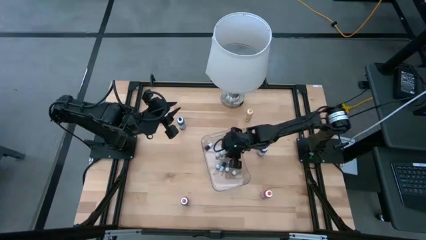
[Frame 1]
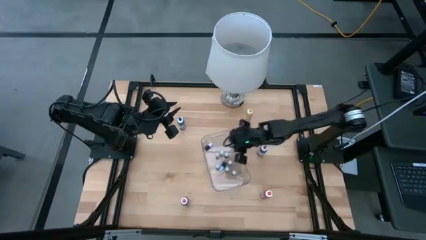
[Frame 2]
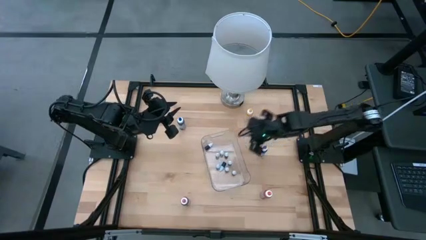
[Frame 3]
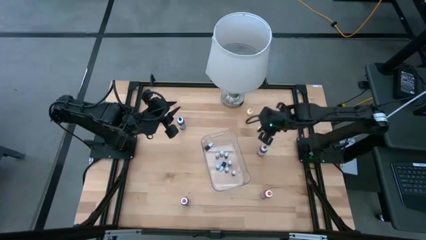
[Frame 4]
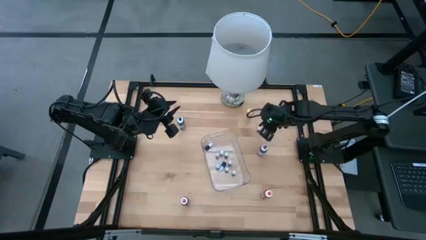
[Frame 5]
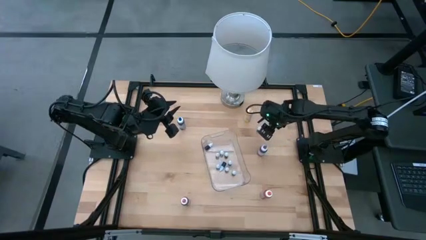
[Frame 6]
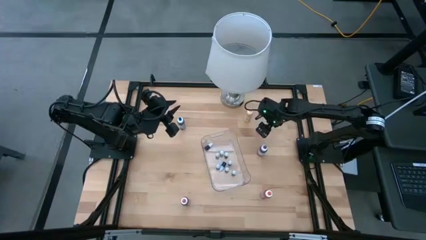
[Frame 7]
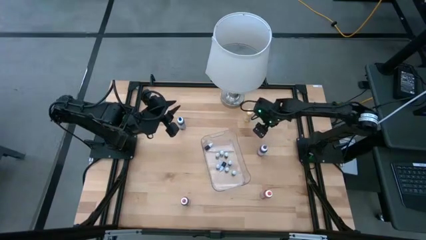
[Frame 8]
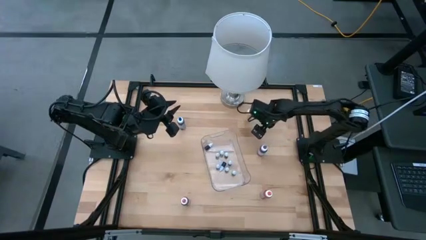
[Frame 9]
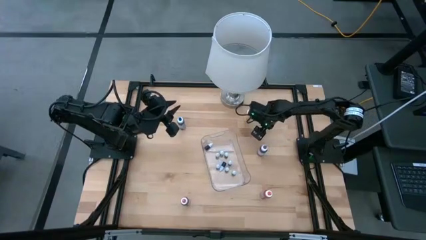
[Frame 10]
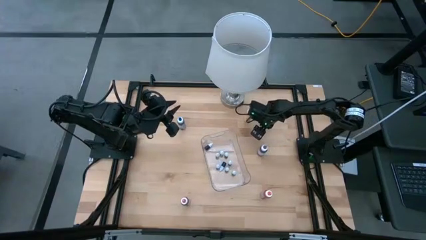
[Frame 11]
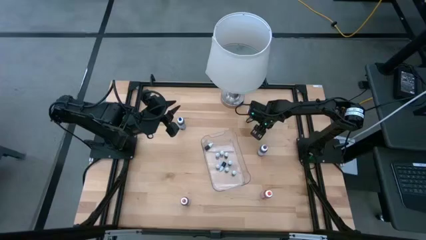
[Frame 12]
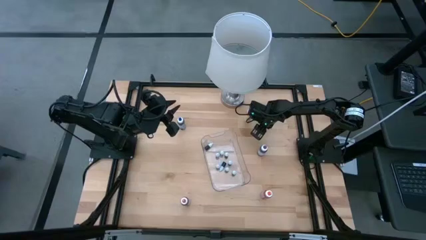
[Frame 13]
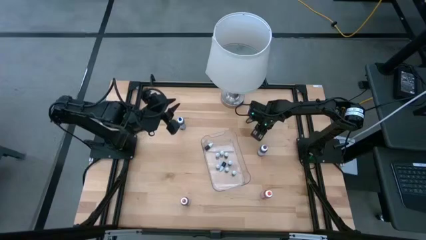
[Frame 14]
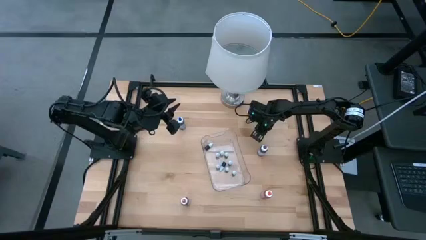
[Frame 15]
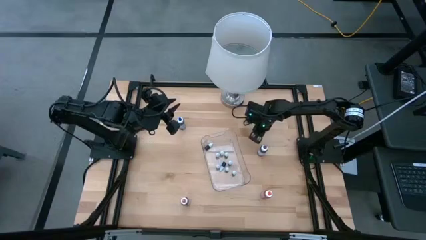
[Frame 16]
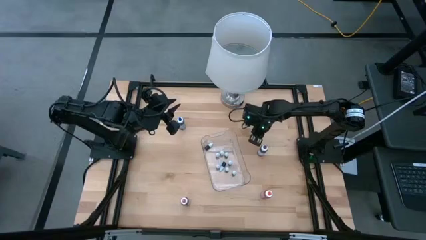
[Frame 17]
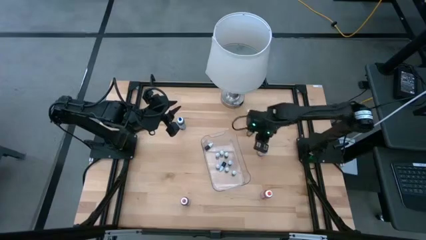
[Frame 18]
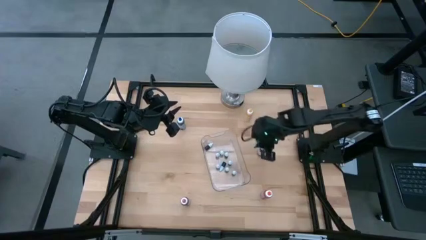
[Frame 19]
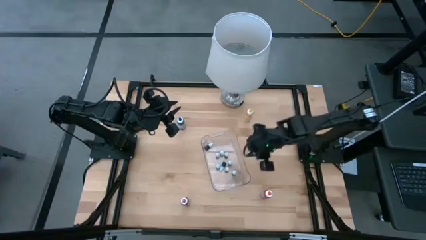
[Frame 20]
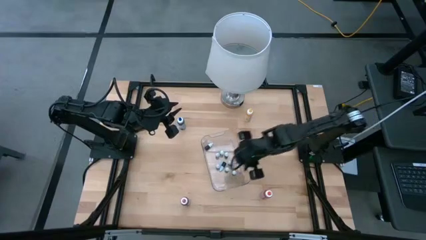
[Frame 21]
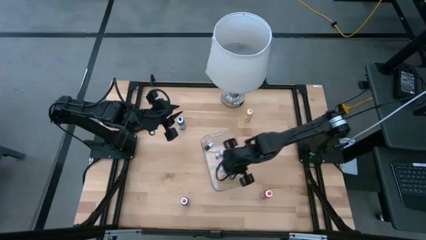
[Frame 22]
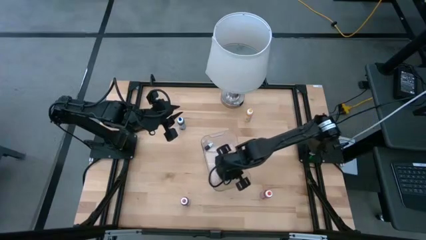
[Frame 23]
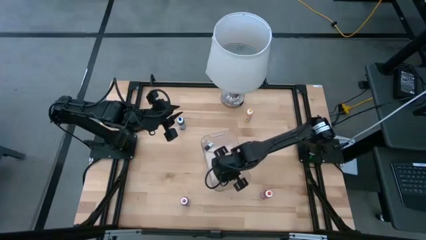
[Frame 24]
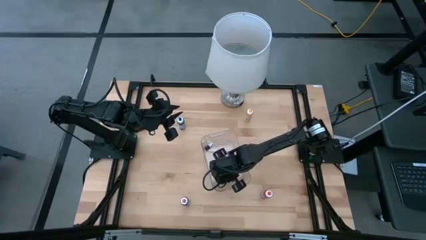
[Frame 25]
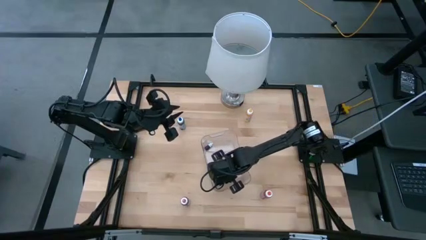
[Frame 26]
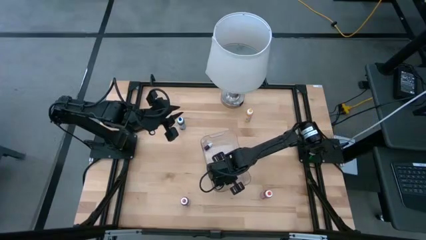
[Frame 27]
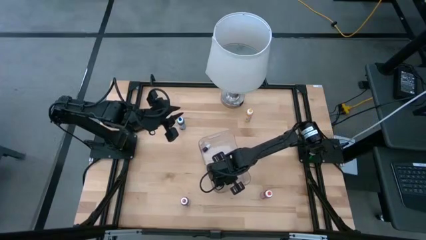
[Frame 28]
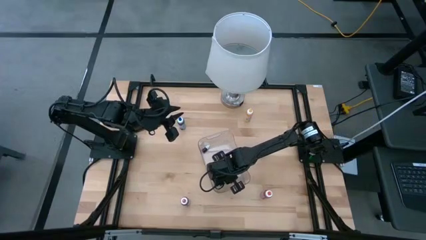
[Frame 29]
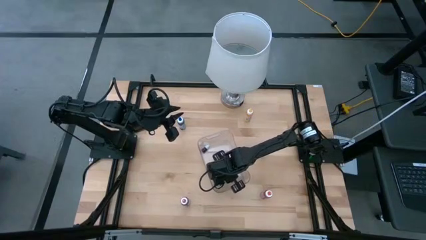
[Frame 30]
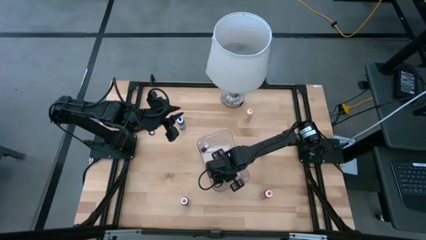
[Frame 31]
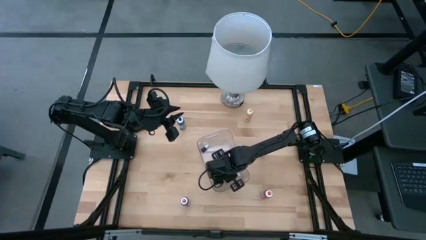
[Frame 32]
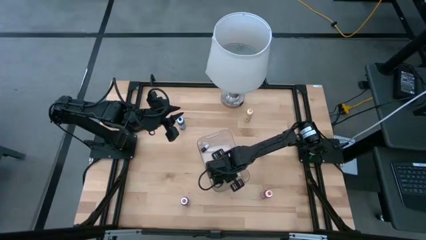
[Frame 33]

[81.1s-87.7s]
Task: Pick & Place food coloring
Put the small blue food coloring bottle into the transparent bin

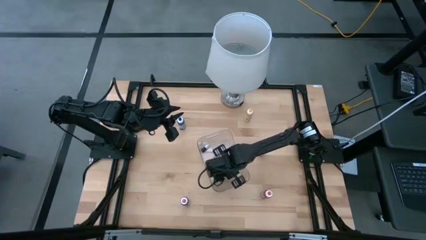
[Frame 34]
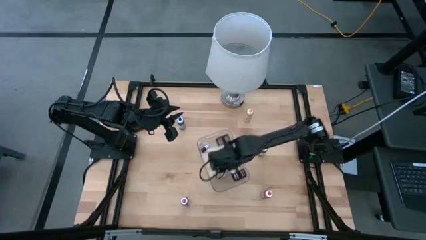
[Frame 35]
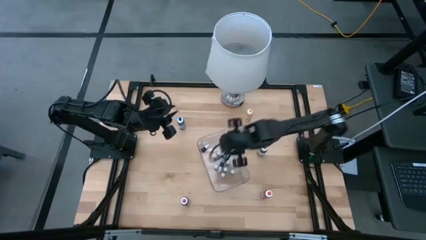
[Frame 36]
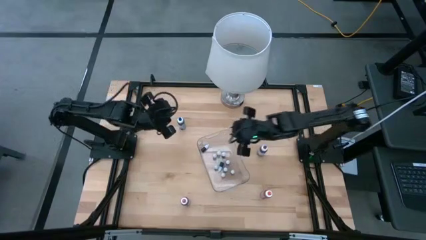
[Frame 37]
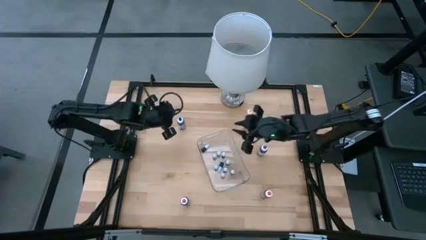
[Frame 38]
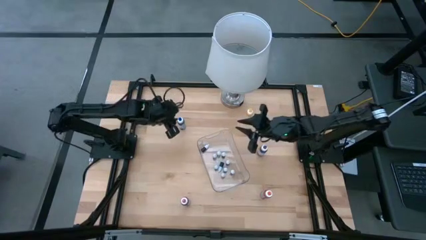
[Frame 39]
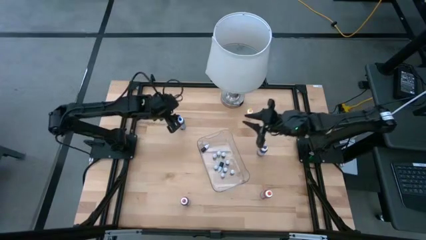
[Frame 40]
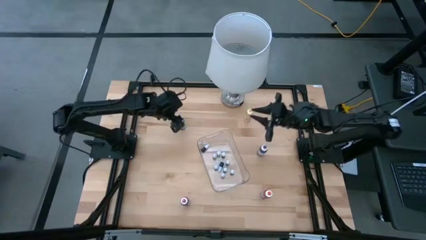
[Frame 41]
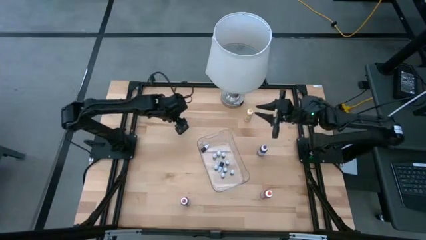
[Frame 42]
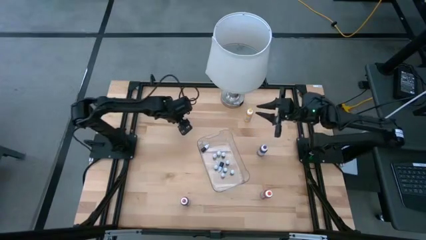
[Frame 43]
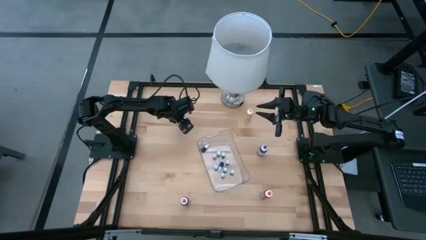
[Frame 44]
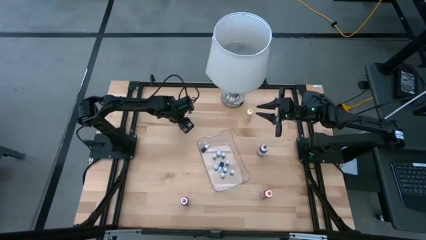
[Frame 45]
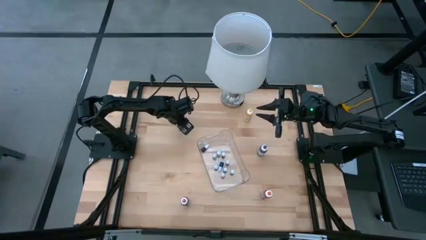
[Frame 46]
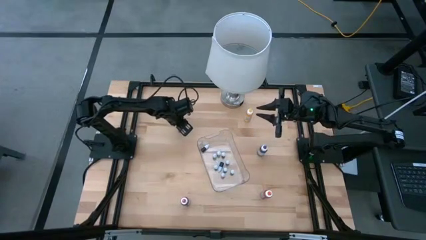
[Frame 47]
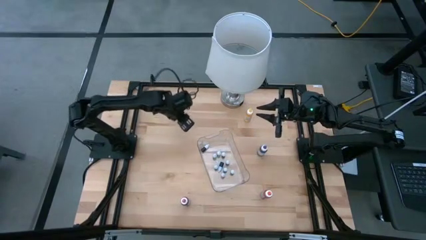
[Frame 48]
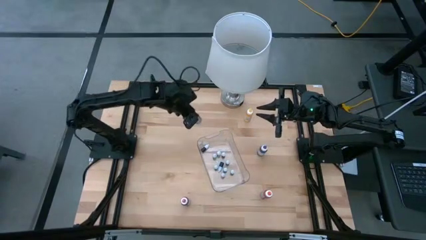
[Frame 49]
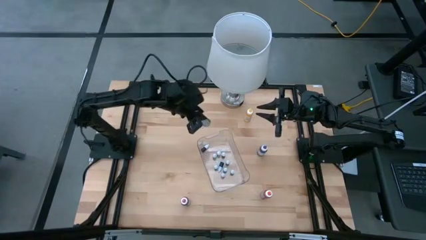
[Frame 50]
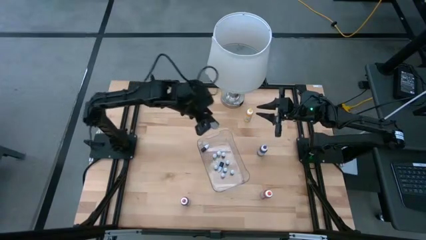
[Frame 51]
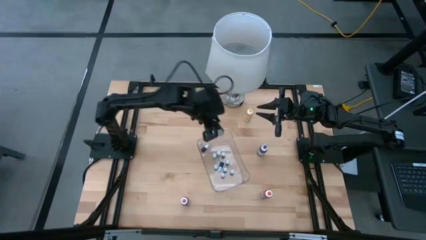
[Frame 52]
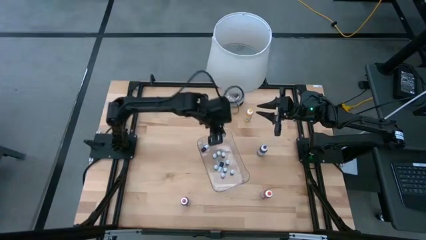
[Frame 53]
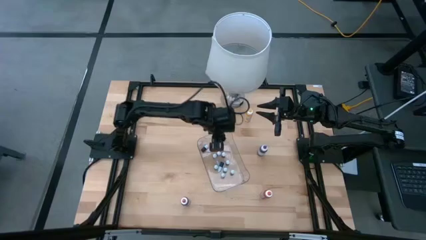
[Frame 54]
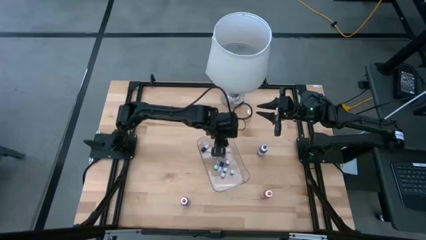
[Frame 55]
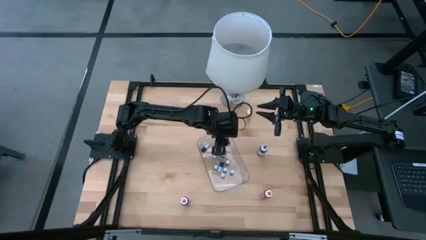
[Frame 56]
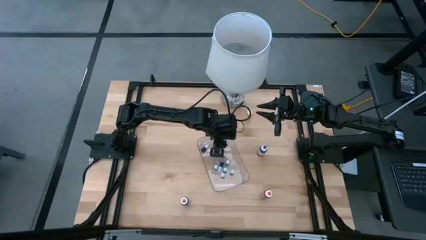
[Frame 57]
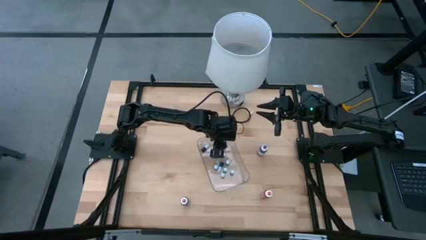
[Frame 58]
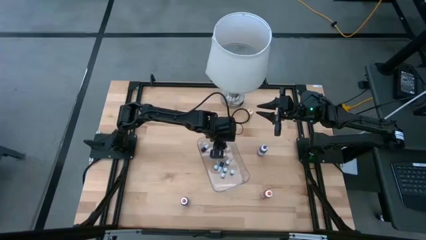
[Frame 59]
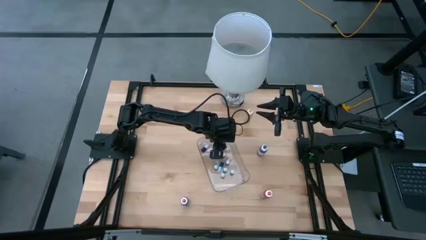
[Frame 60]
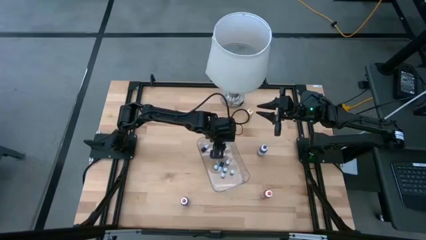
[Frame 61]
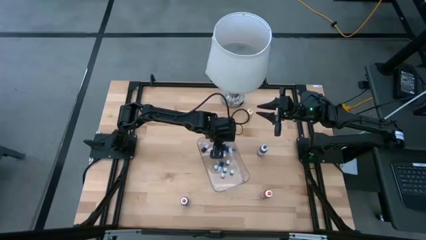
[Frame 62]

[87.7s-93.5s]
Put the big blue food coloring bottle into the transparent bin

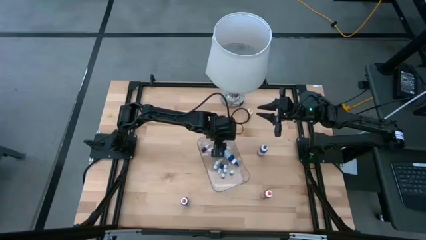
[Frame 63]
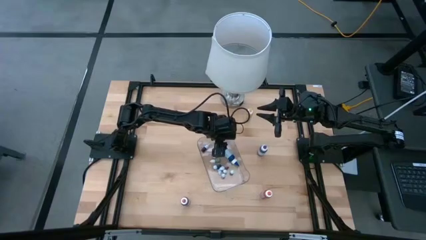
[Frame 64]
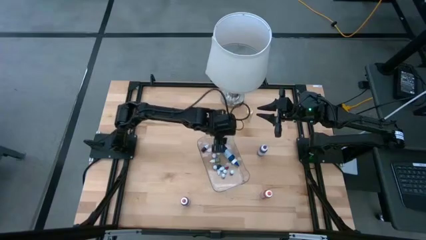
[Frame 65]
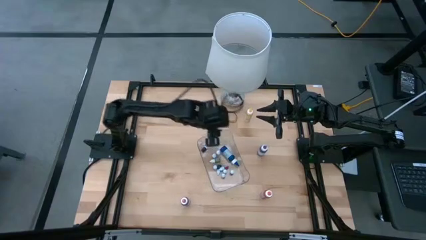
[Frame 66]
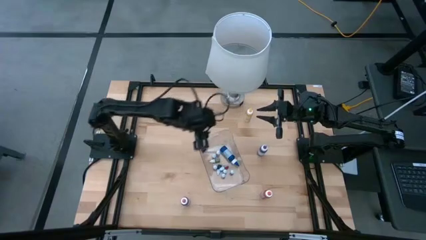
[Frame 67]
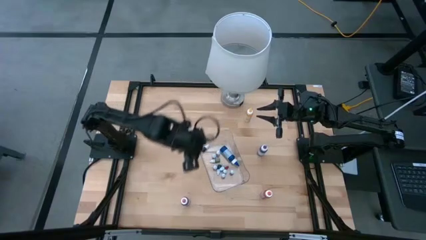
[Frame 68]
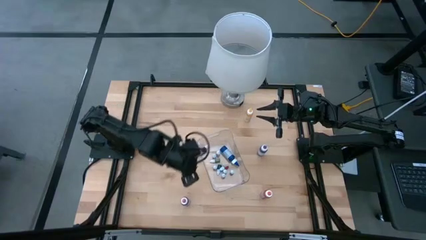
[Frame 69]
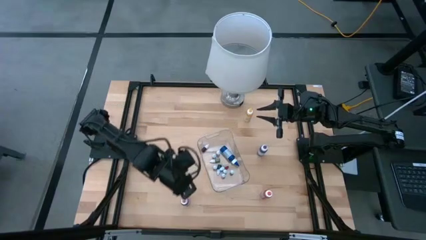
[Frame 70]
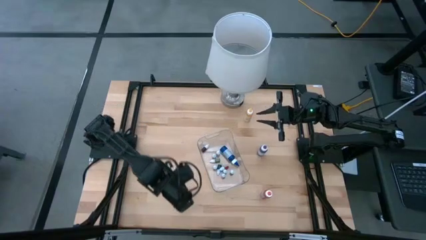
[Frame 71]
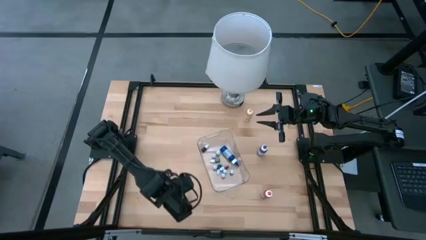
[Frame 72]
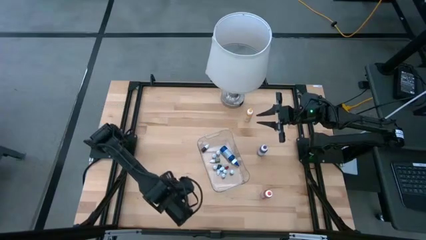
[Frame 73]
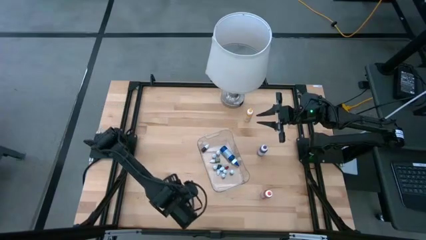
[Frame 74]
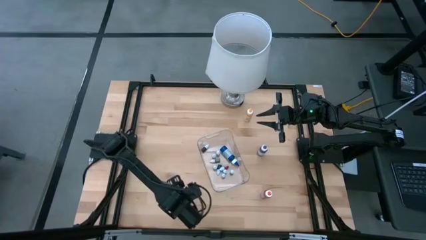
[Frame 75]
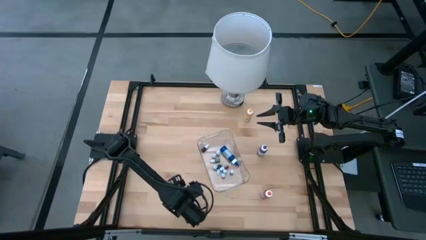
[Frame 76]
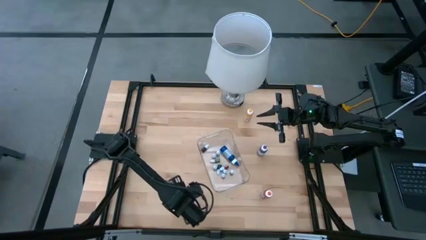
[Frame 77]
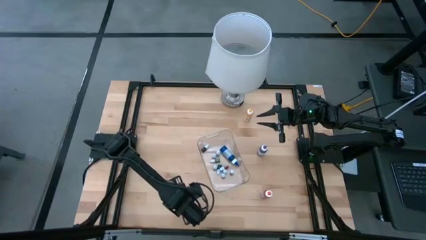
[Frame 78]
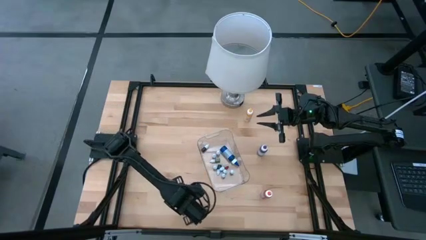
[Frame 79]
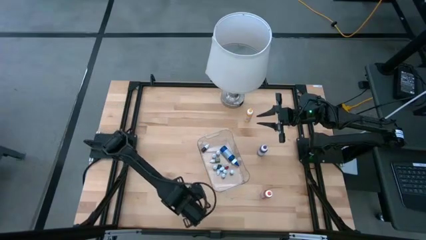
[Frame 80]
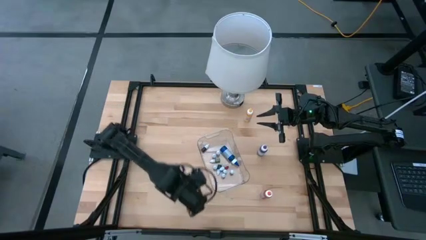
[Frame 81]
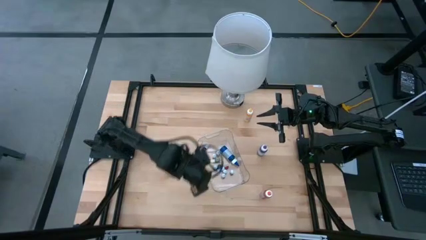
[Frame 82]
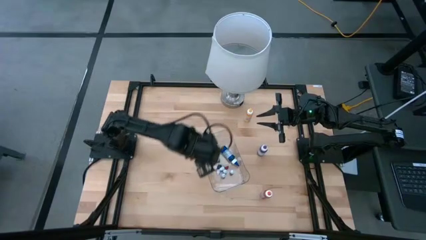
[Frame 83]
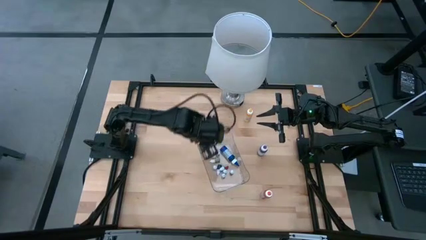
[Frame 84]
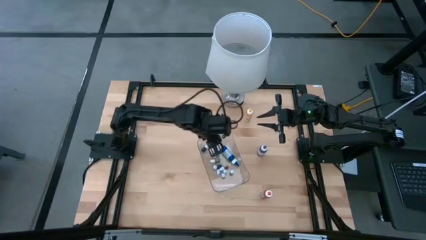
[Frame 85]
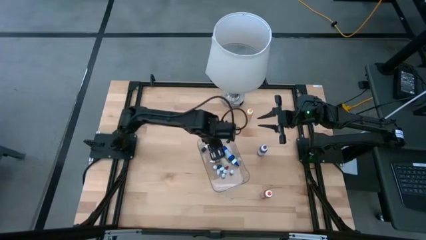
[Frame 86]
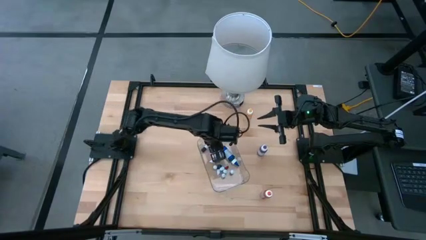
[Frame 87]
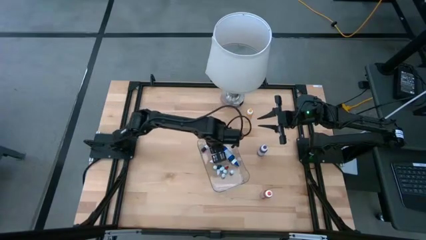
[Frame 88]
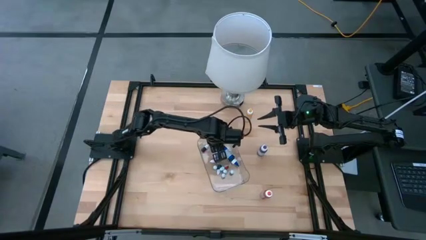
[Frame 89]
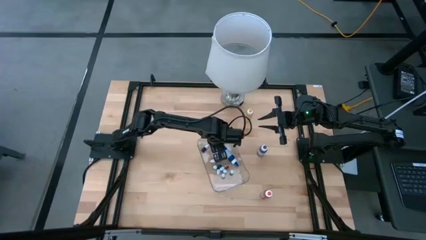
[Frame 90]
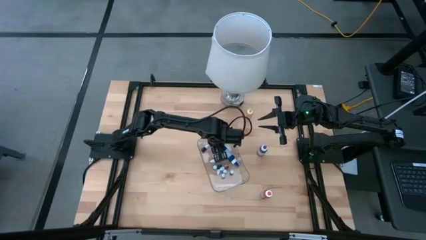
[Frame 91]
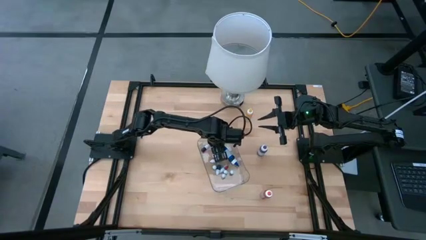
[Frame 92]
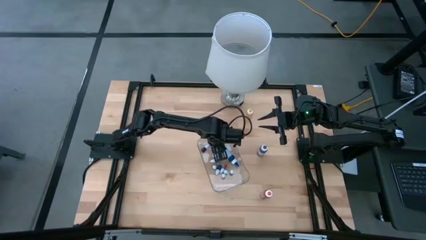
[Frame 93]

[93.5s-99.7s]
Put the big red food coloring bottle into the transparent bin
